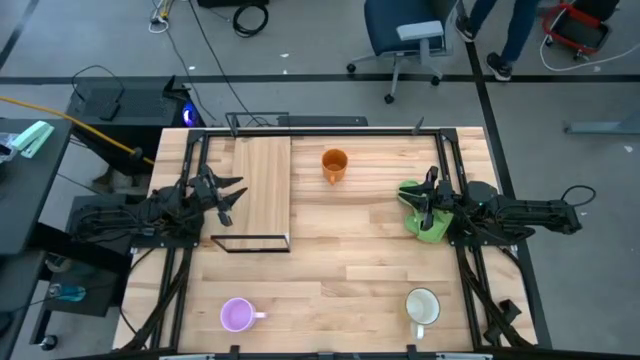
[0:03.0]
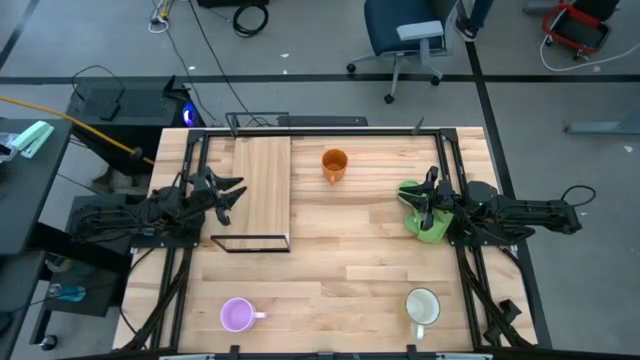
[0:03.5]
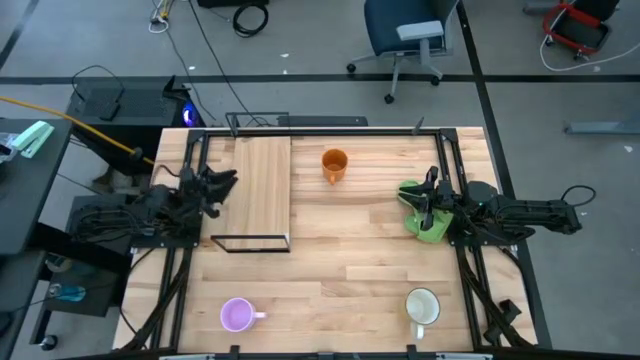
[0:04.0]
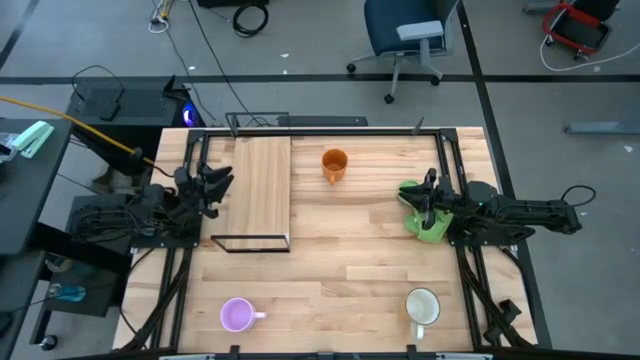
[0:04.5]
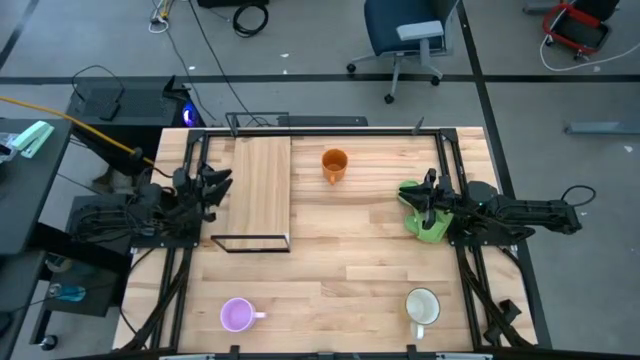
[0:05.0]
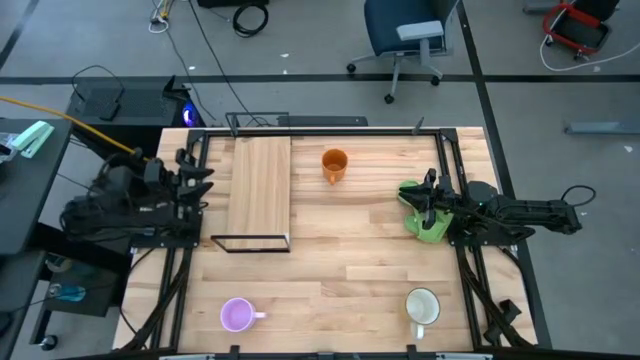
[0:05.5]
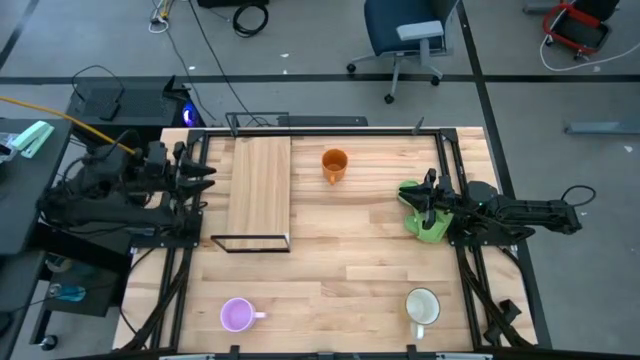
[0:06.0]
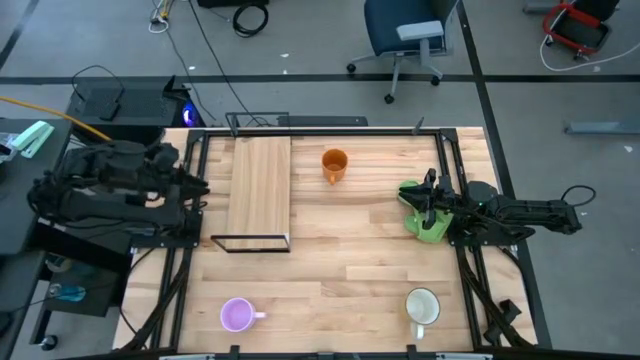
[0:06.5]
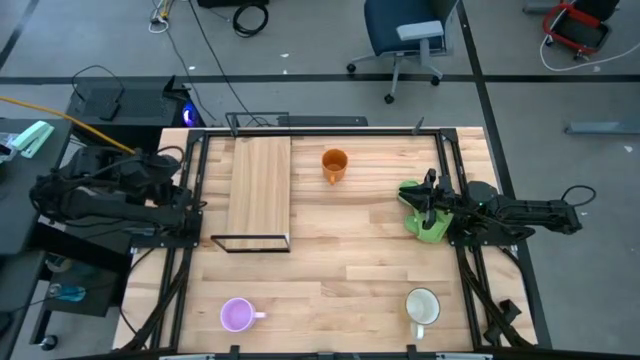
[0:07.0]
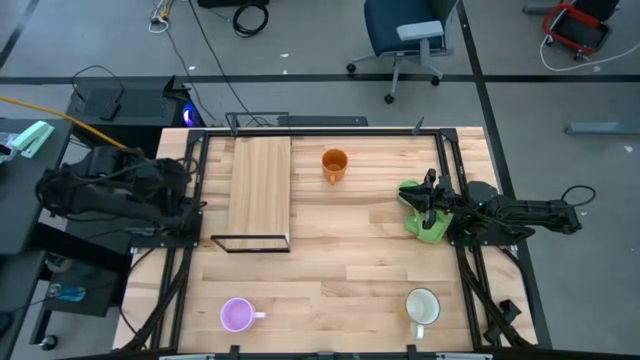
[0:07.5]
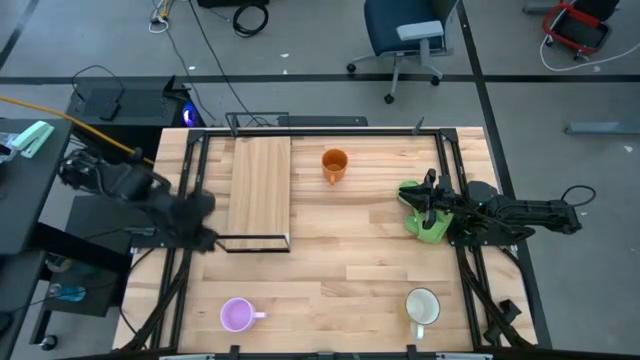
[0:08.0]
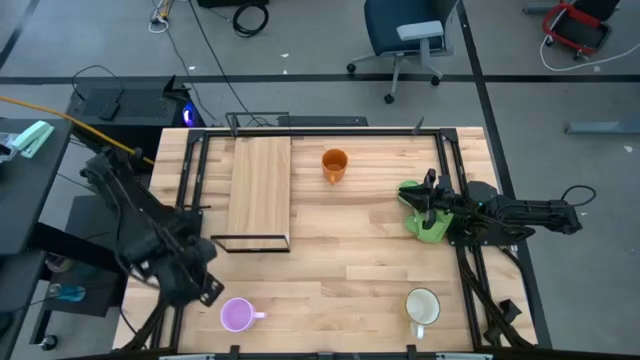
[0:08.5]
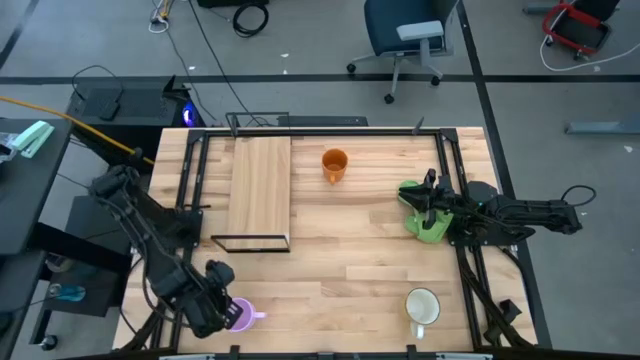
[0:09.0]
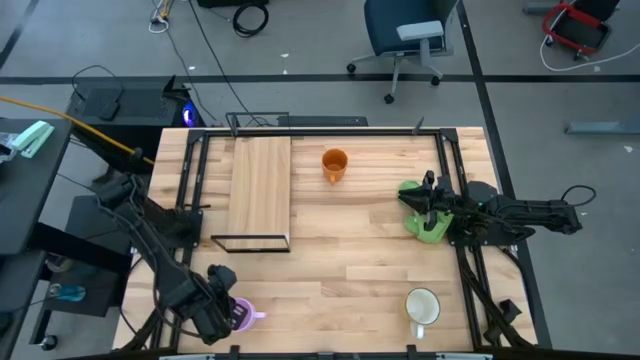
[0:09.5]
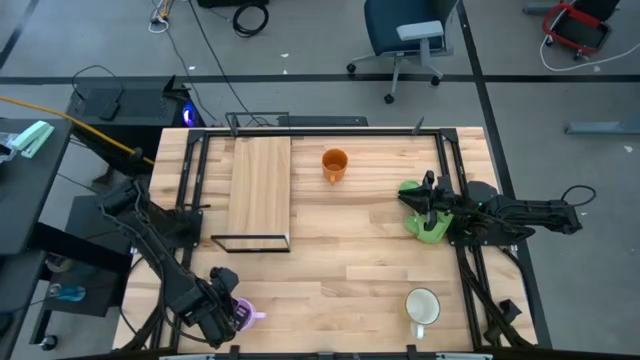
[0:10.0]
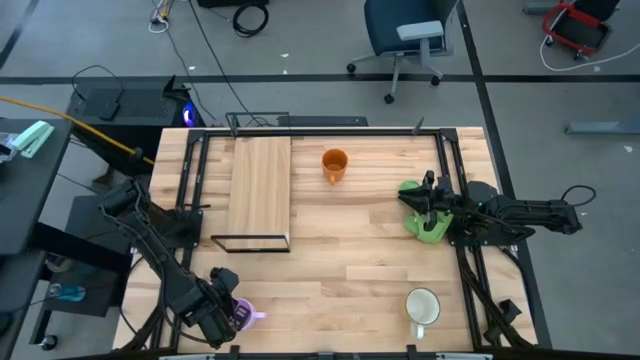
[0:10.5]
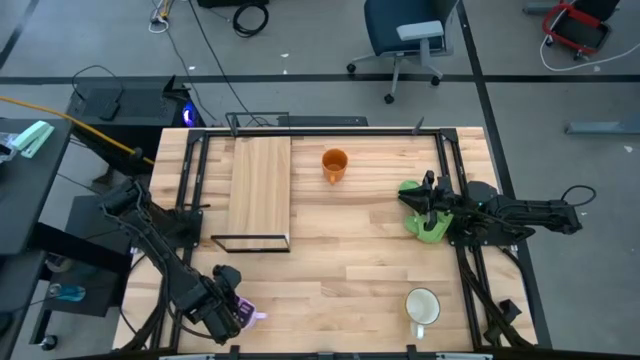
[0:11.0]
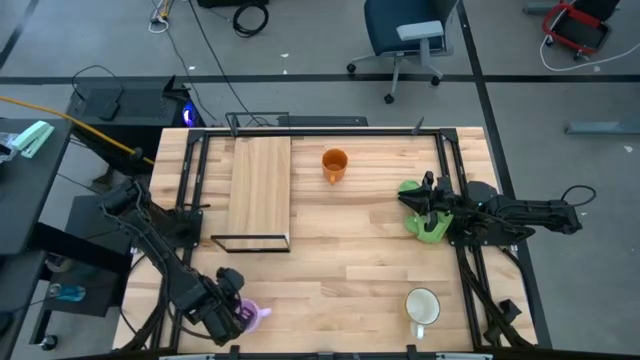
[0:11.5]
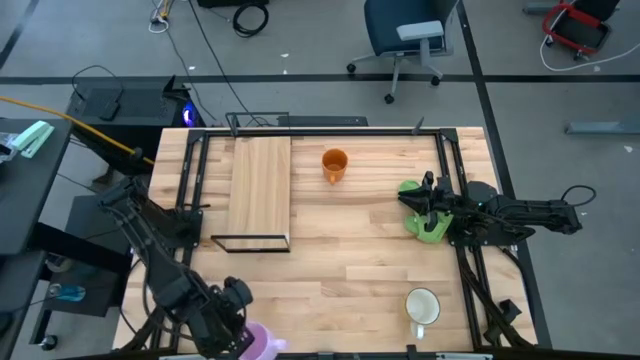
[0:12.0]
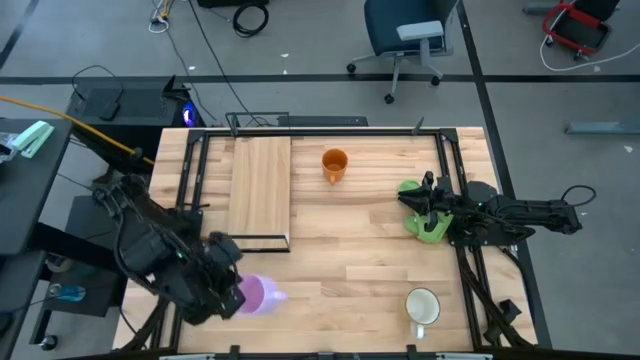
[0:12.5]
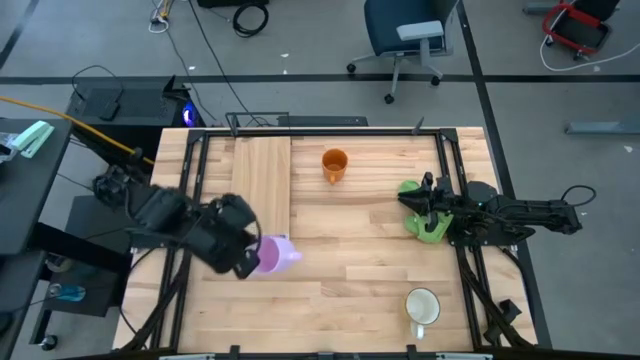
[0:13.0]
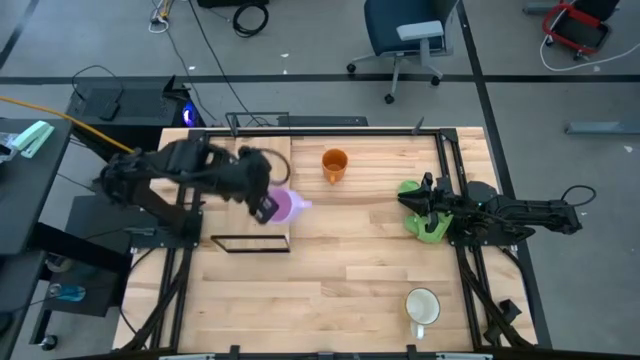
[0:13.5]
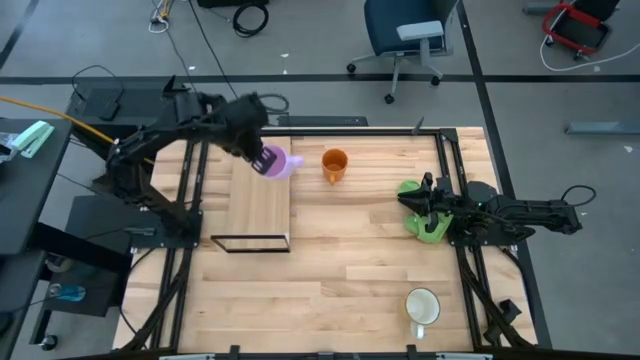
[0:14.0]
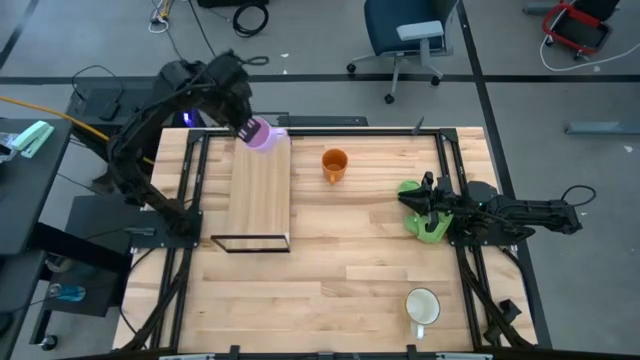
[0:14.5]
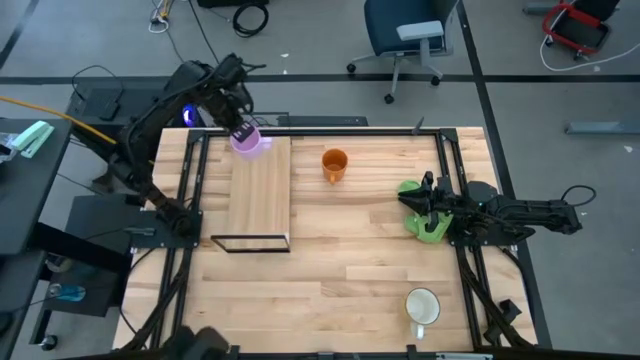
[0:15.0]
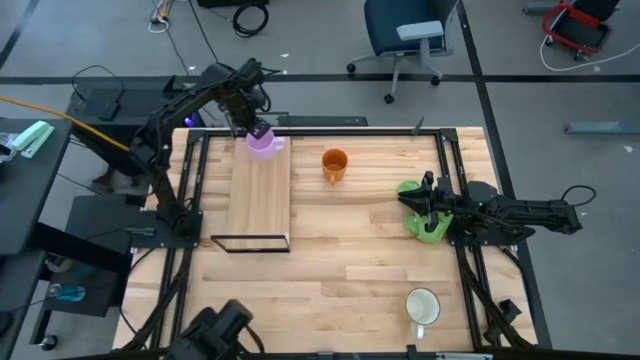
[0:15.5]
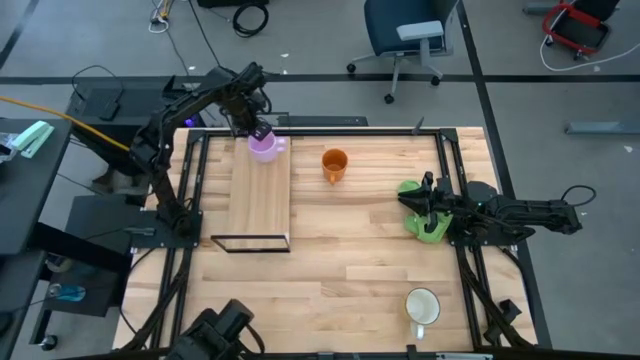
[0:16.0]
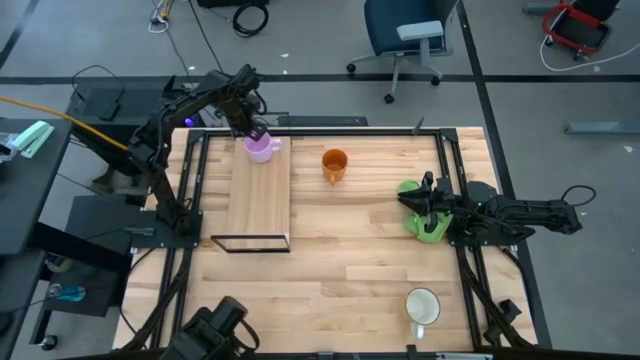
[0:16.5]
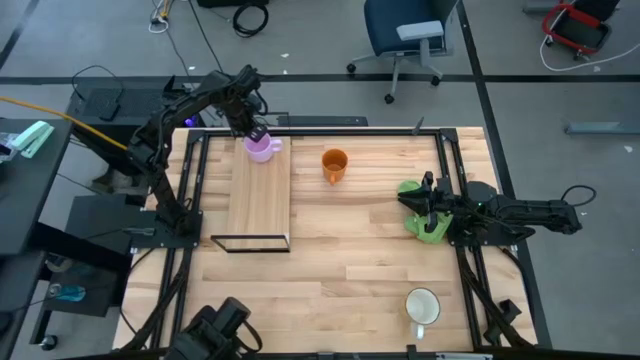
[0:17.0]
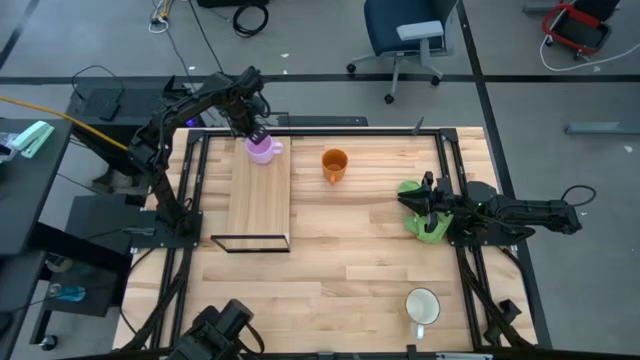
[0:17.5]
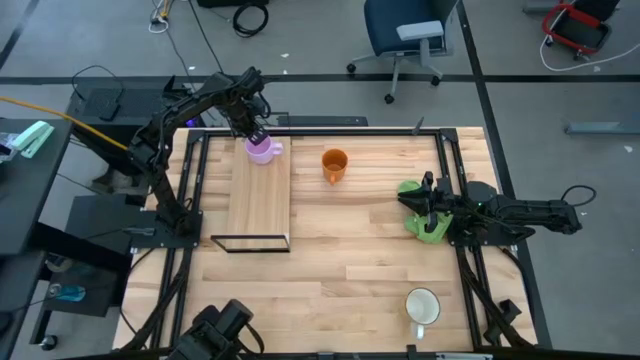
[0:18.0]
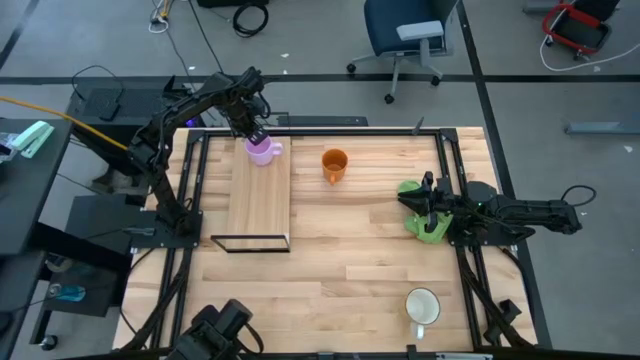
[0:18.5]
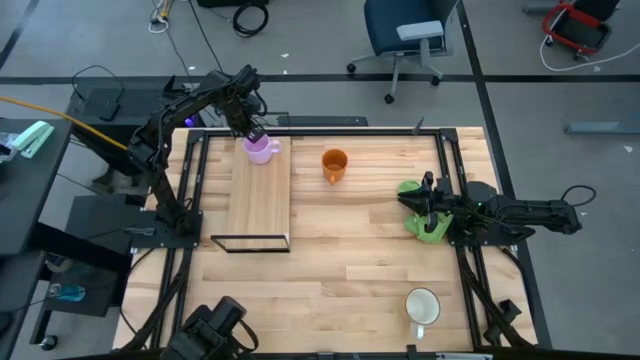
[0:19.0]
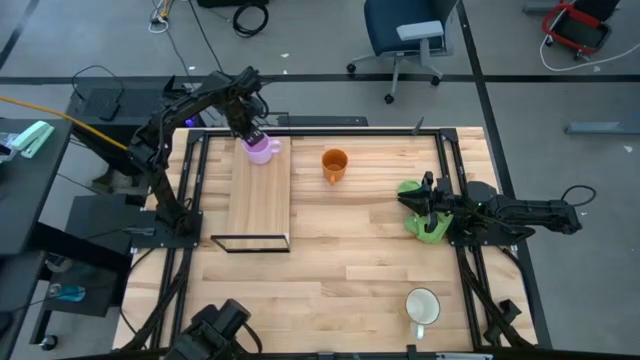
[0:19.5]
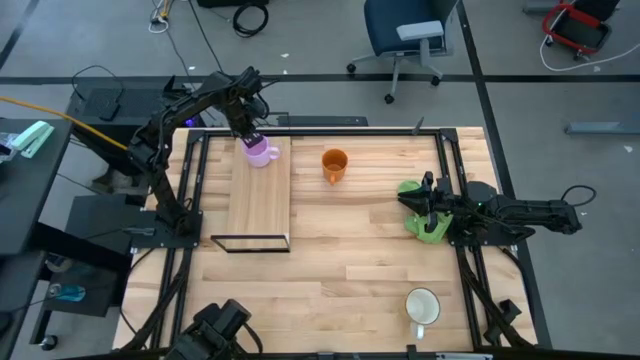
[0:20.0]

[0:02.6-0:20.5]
Task: Stack small to large cups/mugs on shelf
Put the pink mug on the shelf
